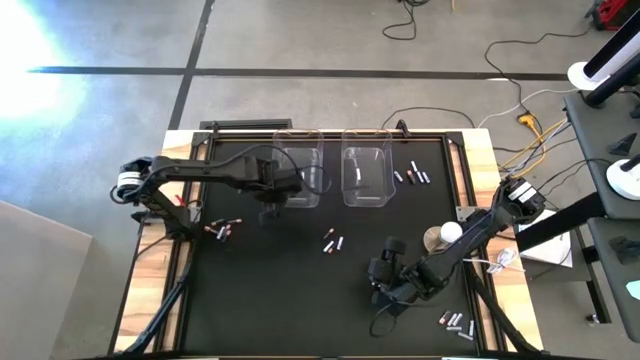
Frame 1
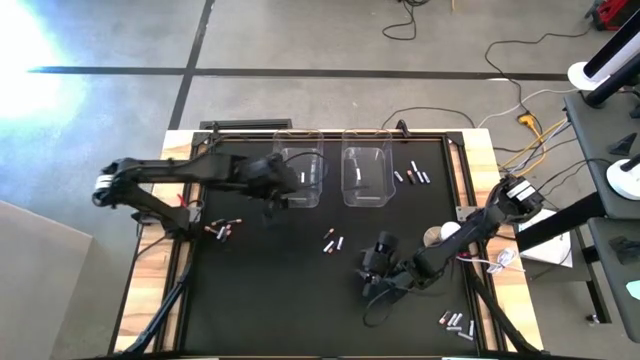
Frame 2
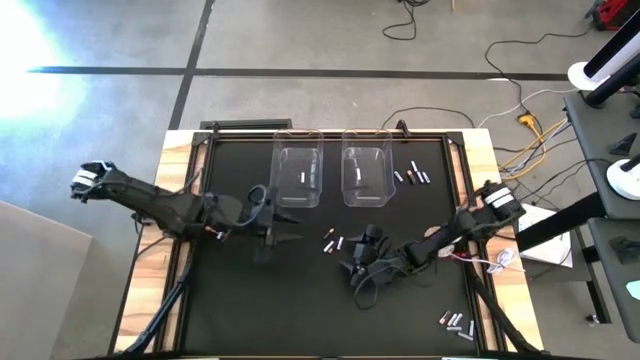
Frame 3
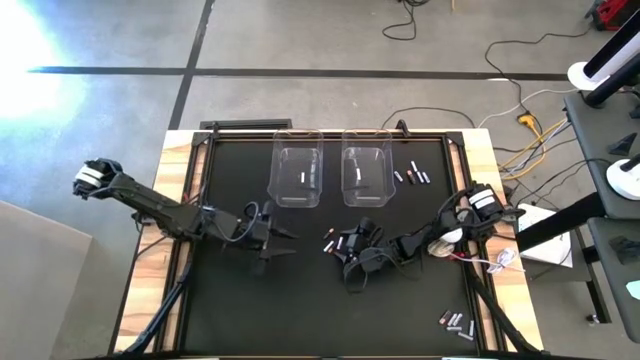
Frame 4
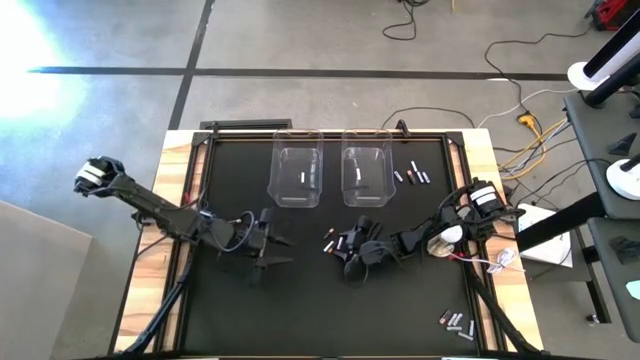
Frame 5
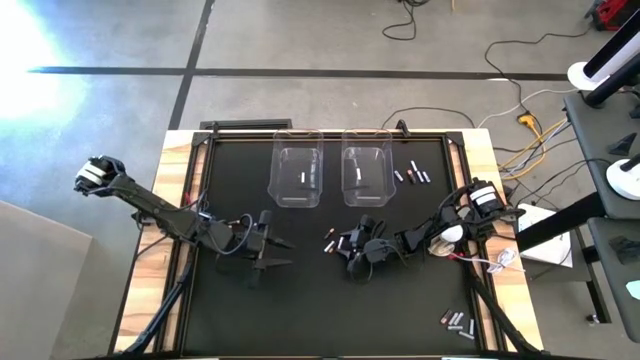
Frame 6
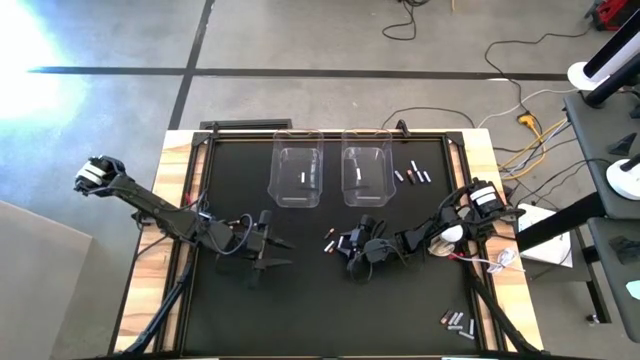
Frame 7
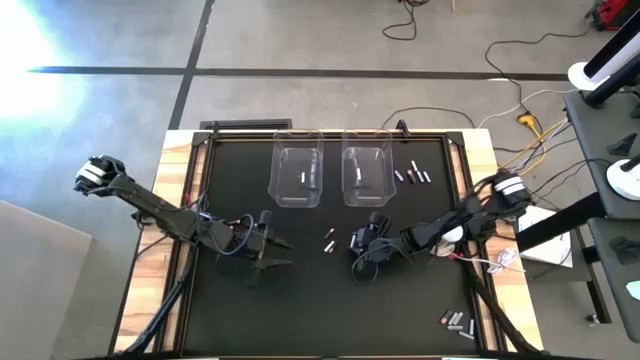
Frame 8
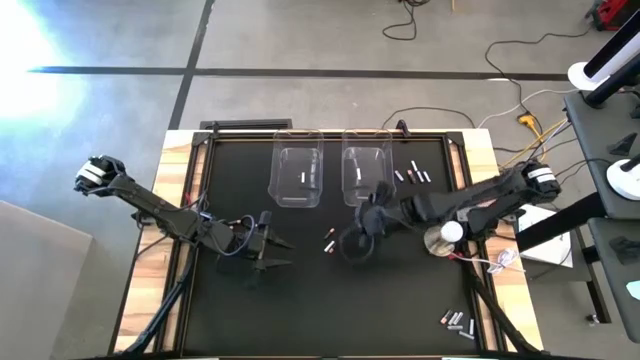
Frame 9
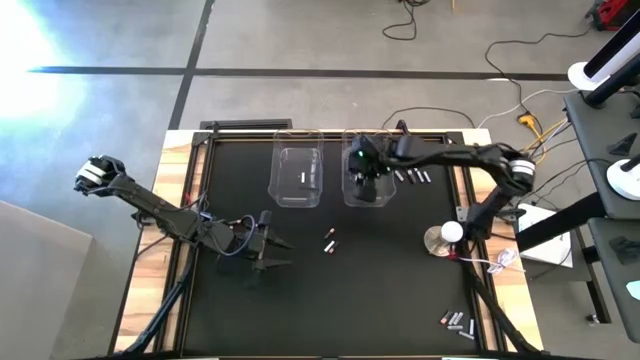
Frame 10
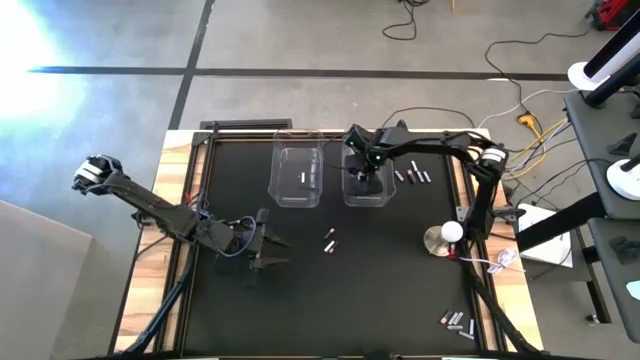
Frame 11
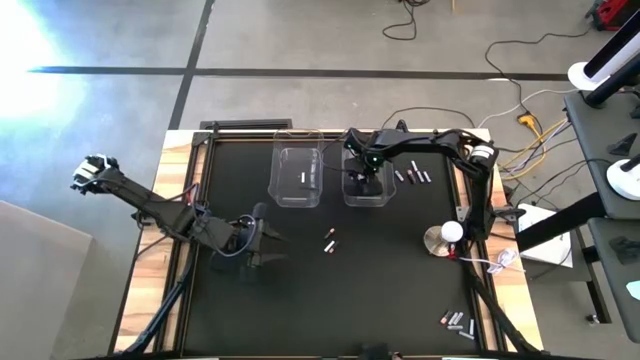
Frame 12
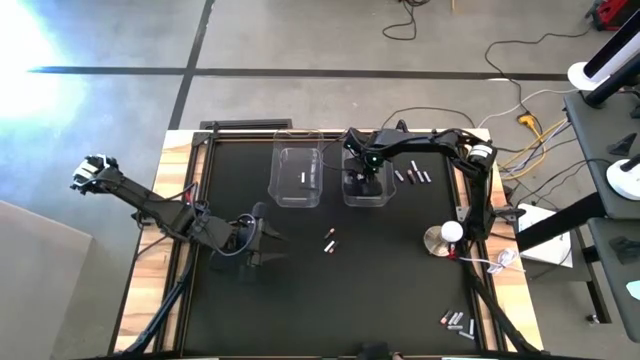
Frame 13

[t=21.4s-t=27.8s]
Task: Sort batteries
Put the white battery into the right transparent bin

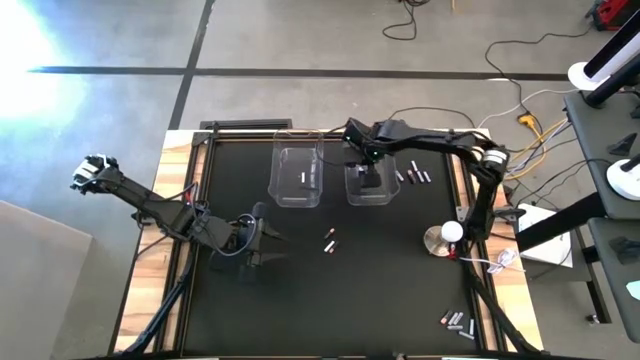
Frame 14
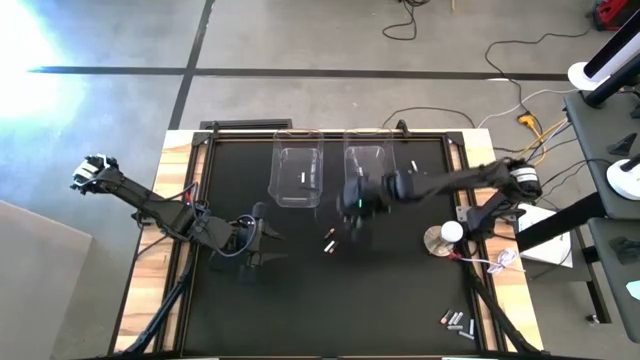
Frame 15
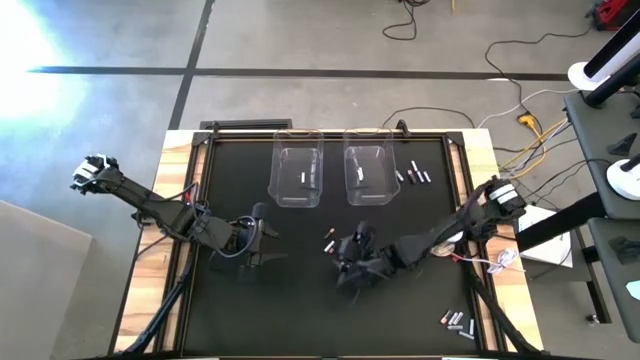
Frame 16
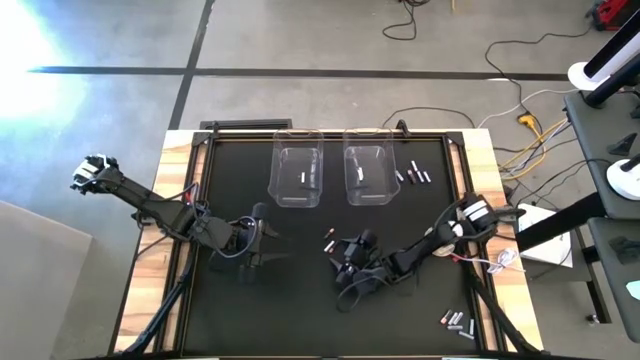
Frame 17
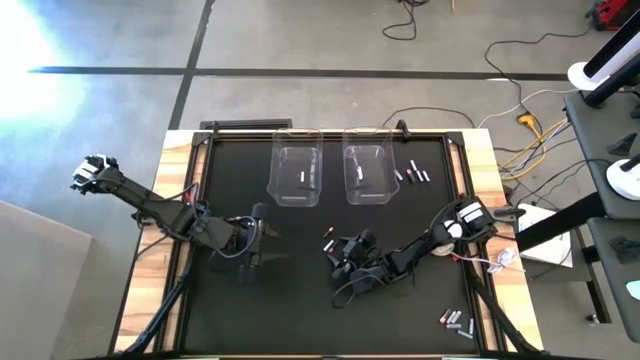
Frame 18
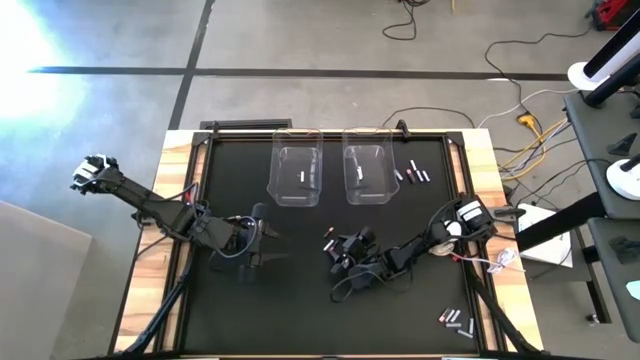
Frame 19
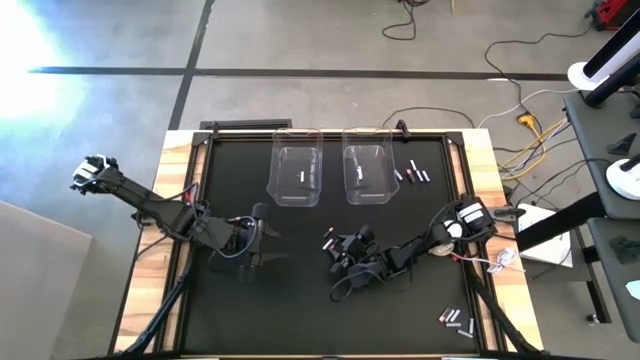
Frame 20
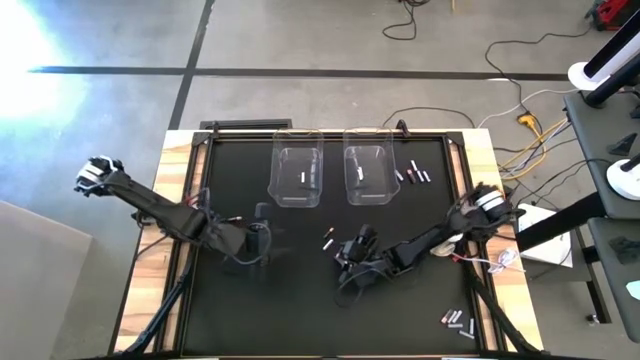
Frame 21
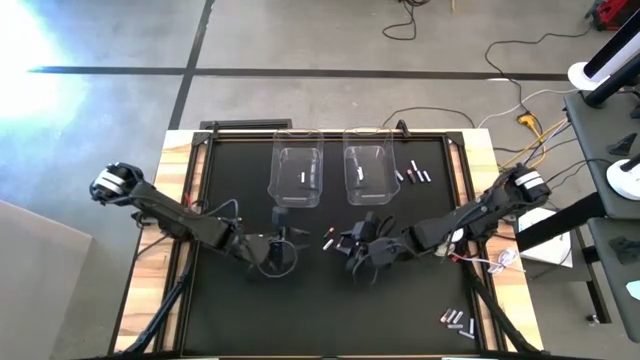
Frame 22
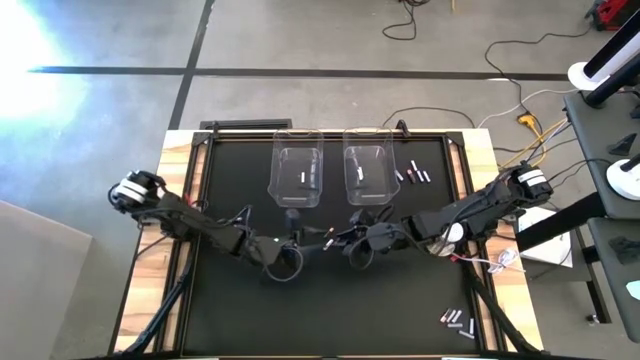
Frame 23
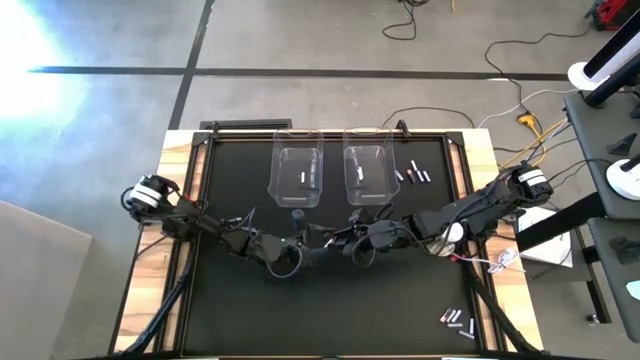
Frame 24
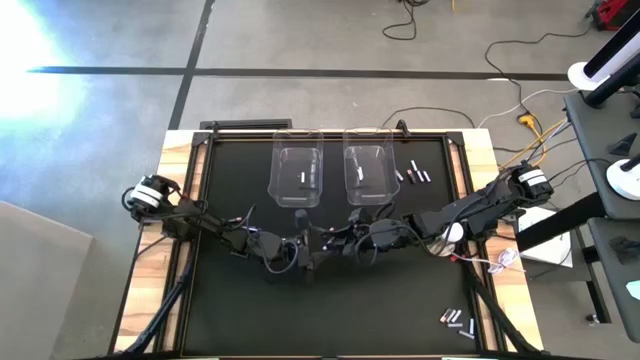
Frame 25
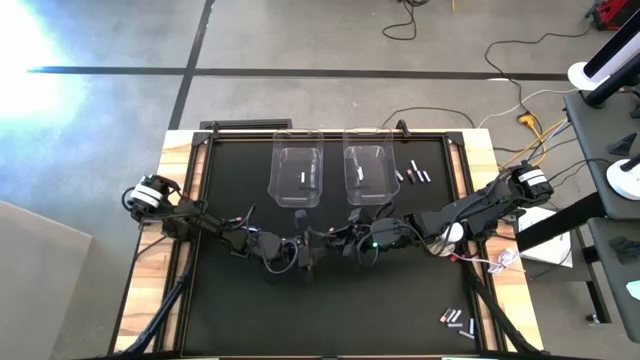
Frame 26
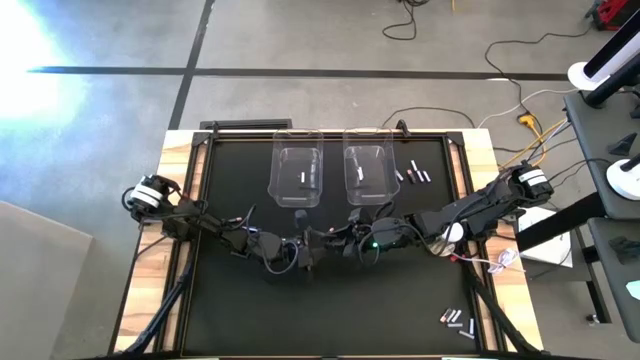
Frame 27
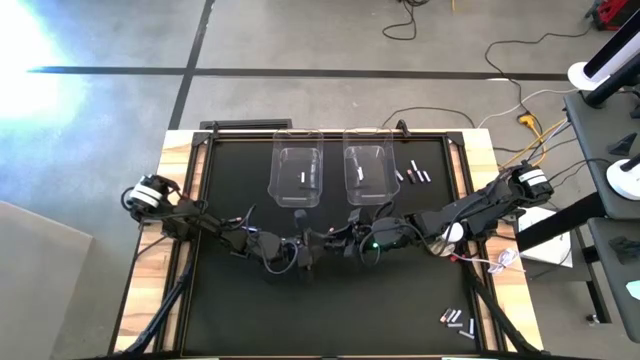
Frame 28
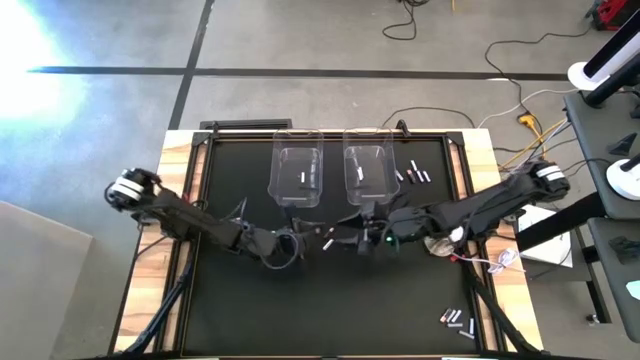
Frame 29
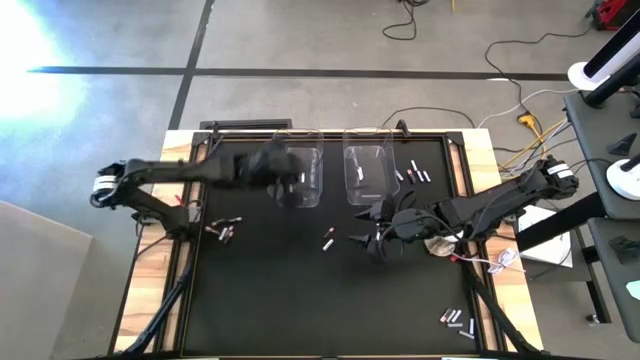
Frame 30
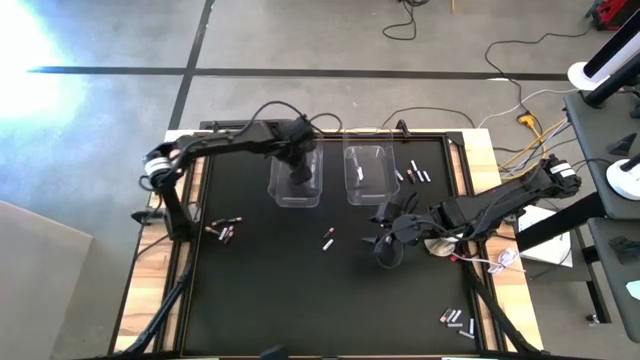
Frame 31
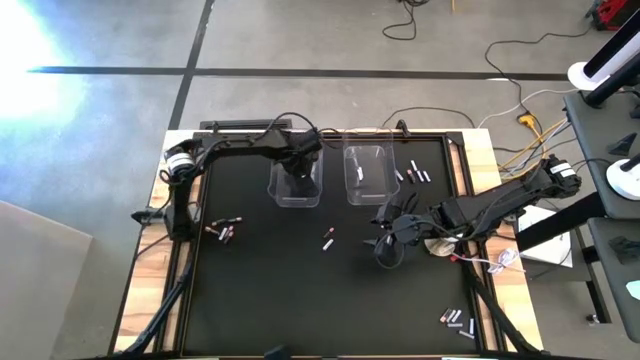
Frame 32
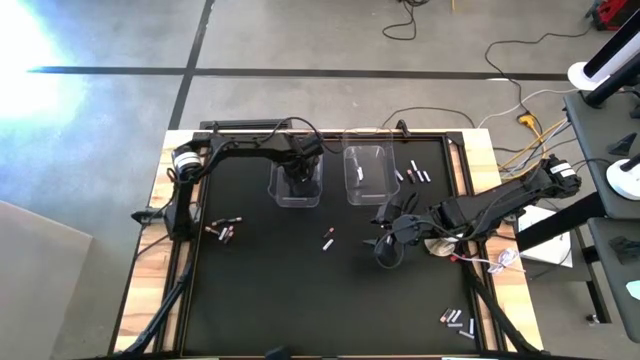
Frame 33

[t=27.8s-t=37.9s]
Put the black battery into the left transparent bin

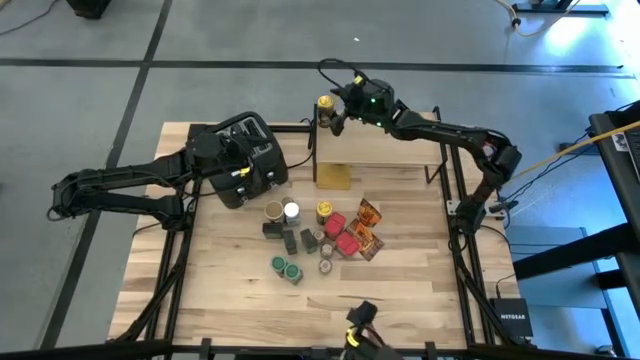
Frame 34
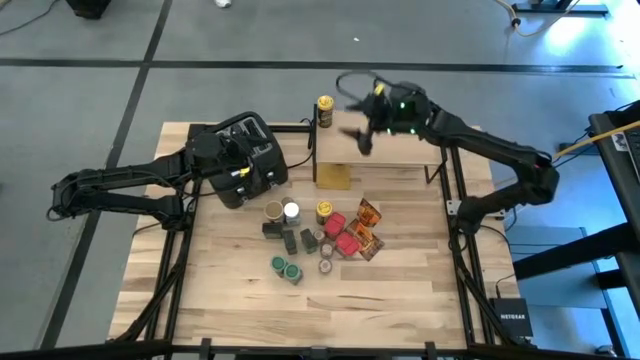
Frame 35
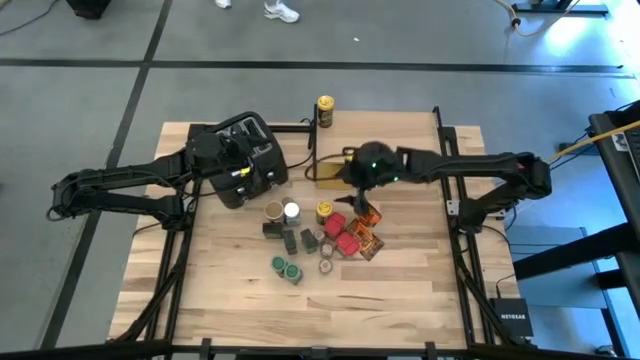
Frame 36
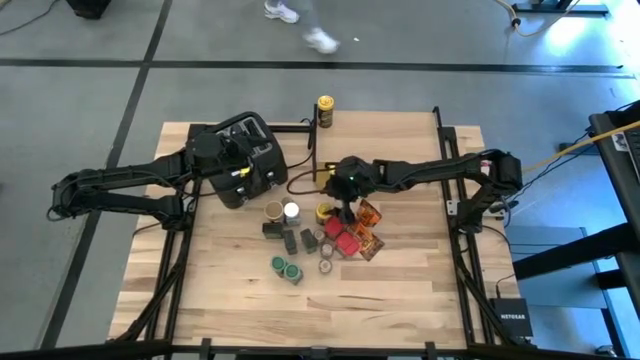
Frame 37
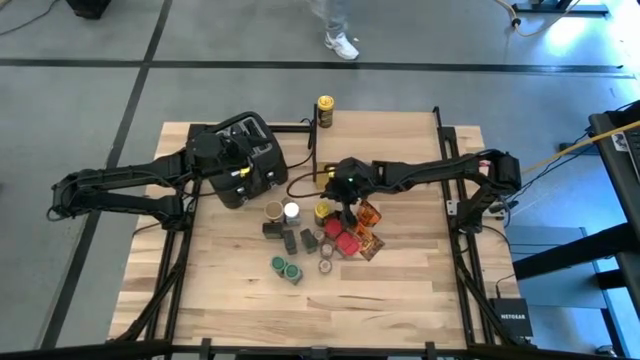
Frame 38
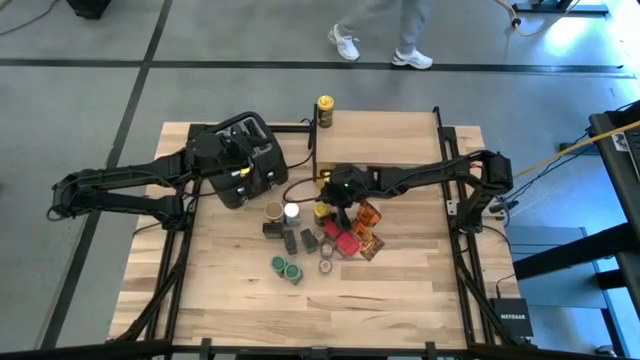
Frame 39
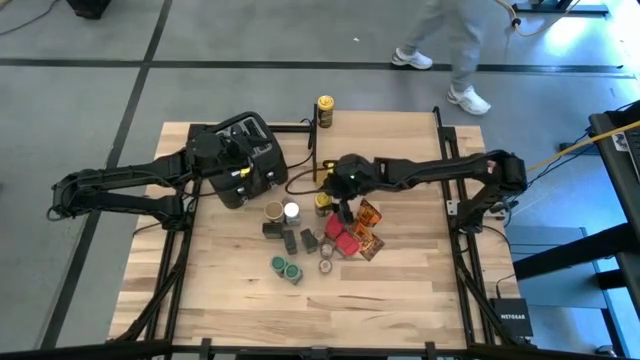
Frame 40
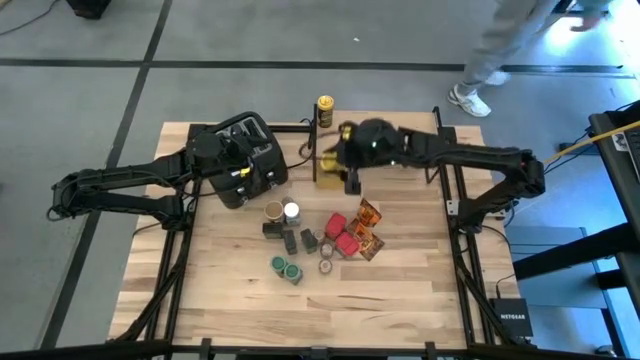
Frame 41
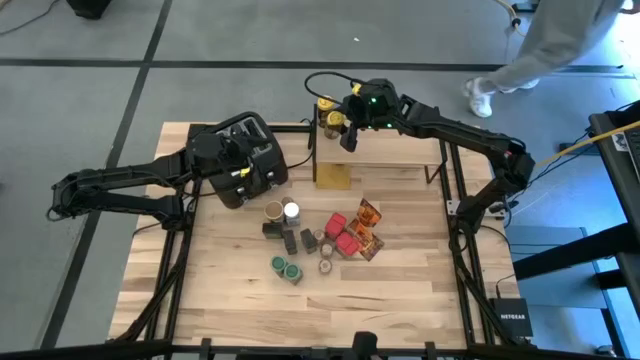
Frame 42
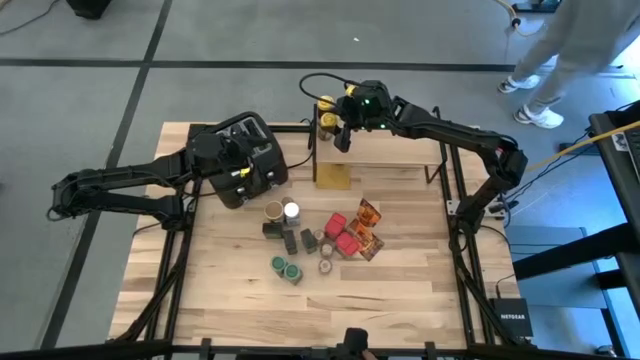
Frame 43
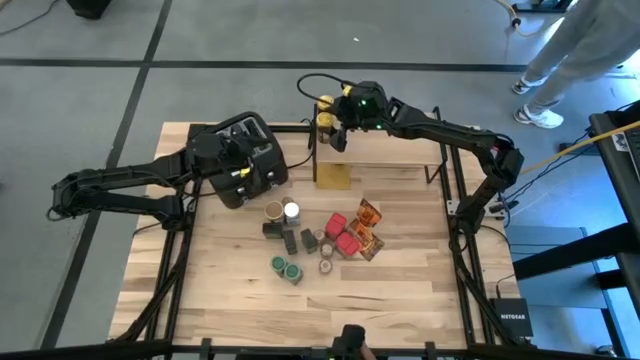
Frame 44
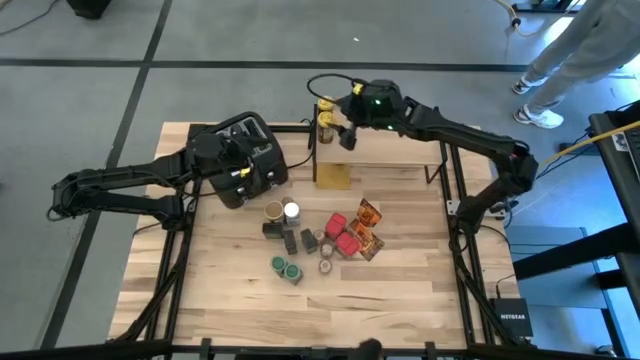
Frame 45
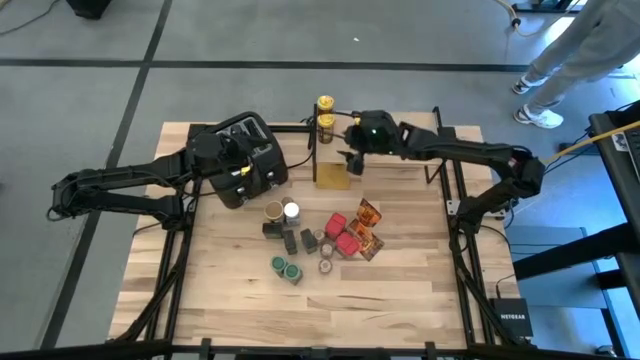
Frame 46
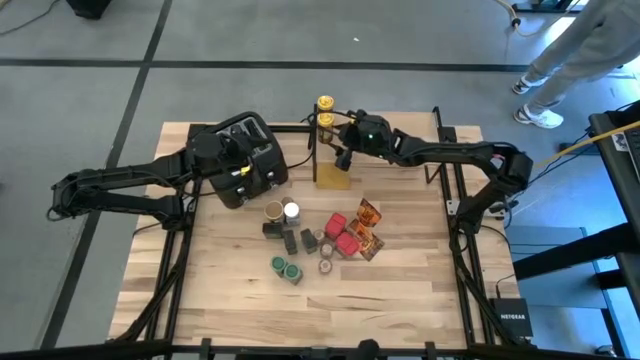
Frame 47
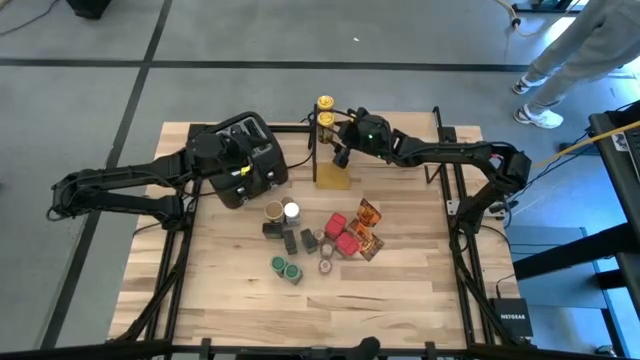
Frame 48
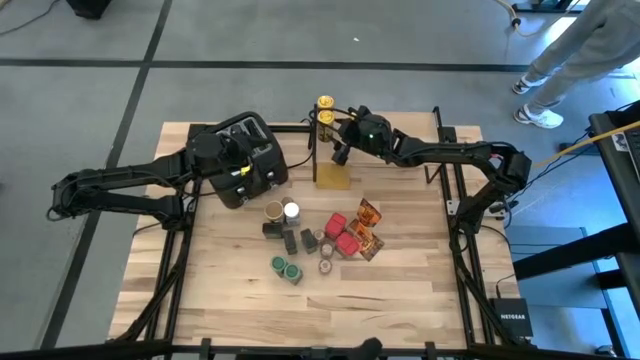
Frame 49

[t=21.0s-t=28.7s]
Task: Shelf spices
Put the yellow seasoning bottle on the shelf
